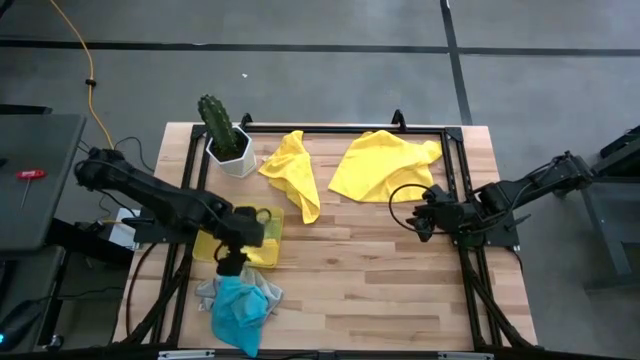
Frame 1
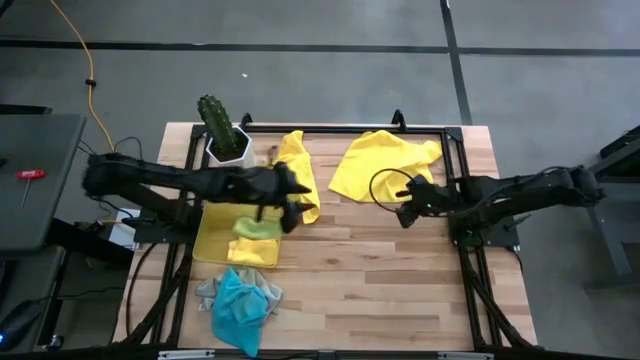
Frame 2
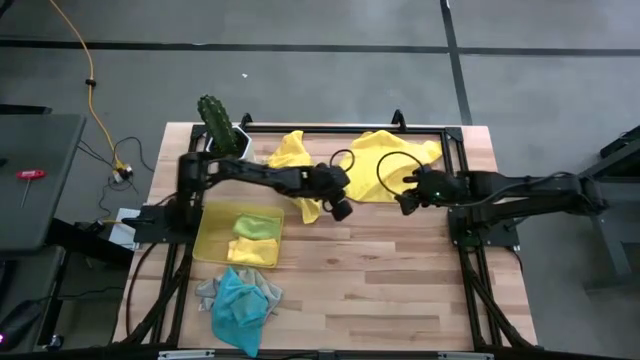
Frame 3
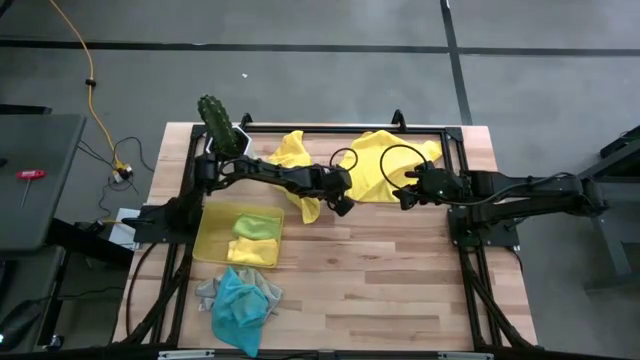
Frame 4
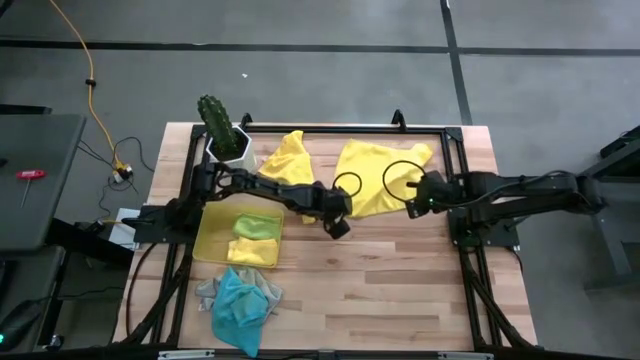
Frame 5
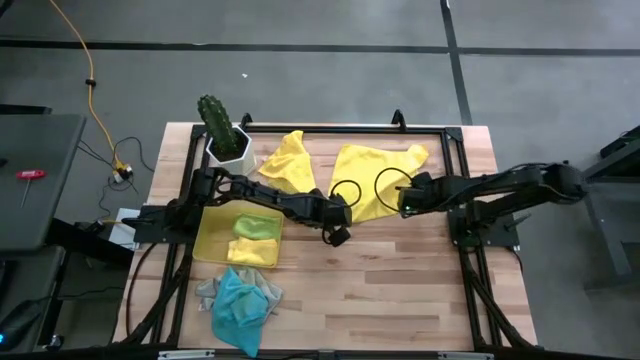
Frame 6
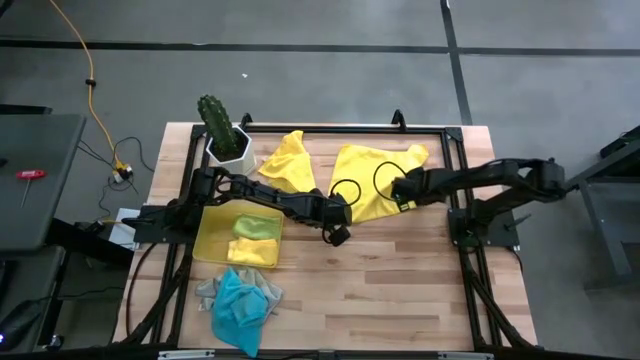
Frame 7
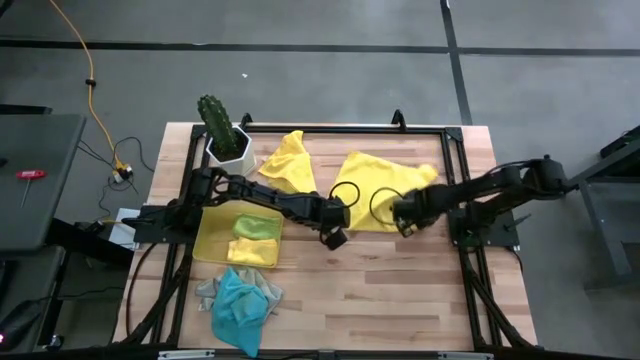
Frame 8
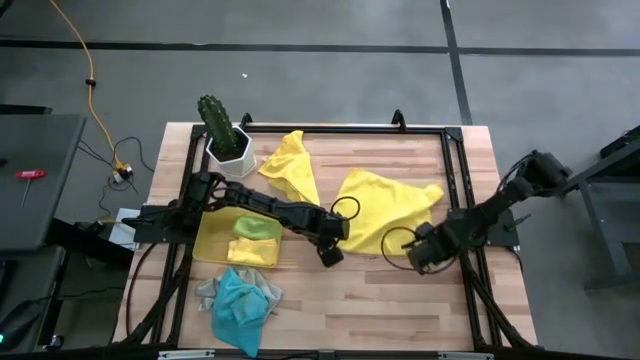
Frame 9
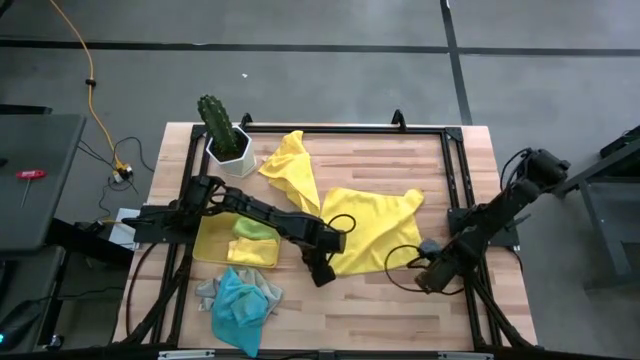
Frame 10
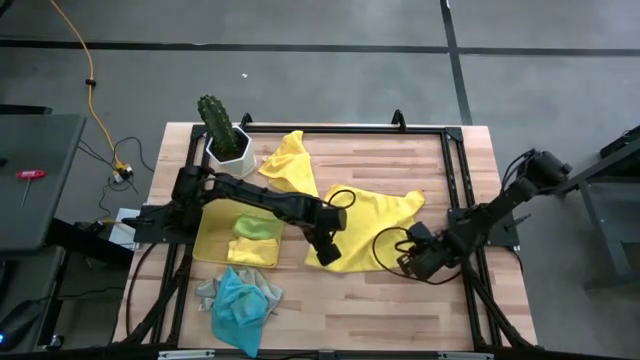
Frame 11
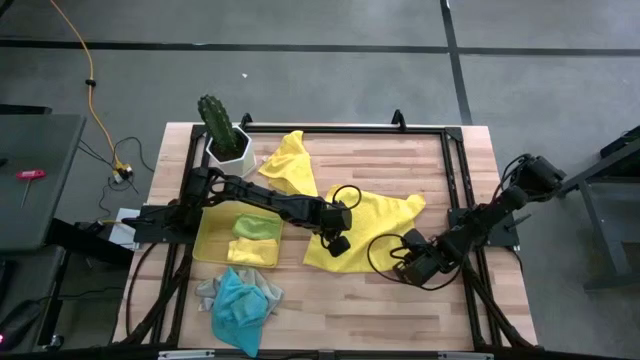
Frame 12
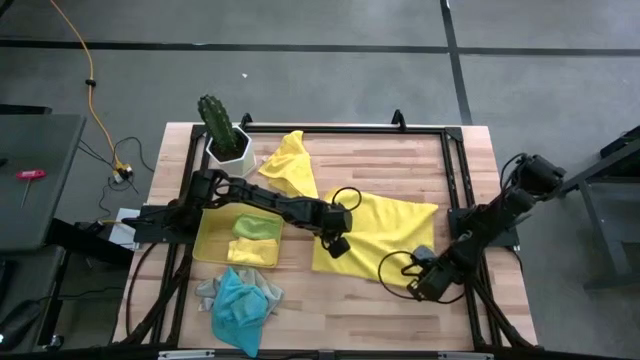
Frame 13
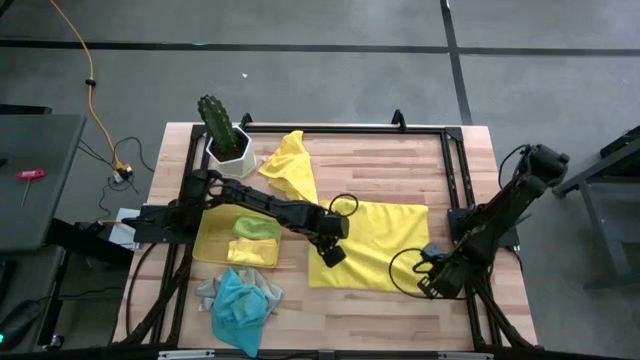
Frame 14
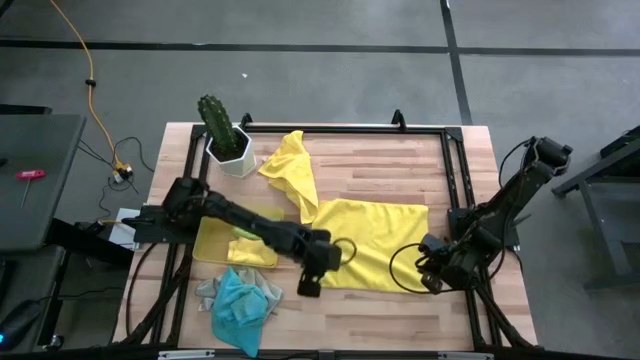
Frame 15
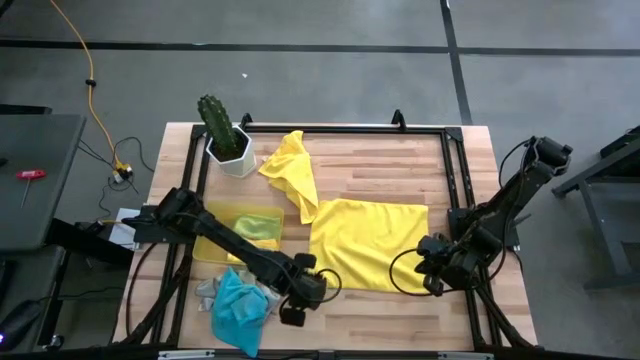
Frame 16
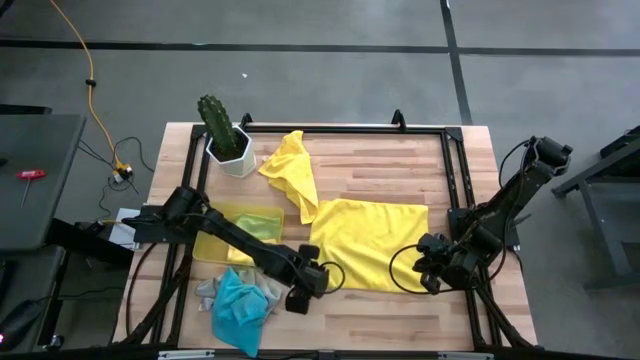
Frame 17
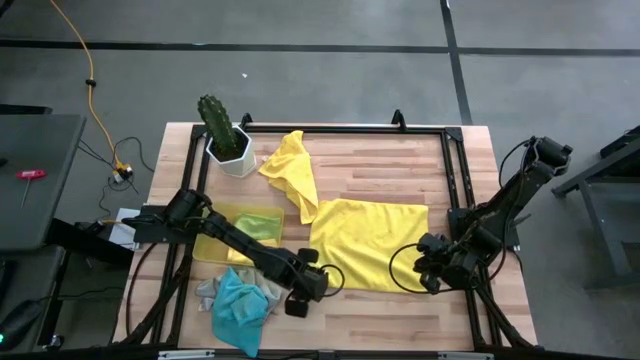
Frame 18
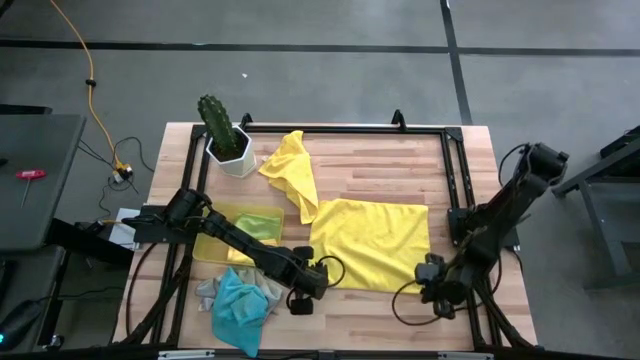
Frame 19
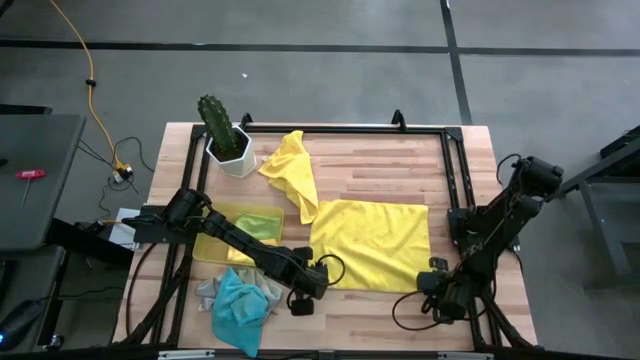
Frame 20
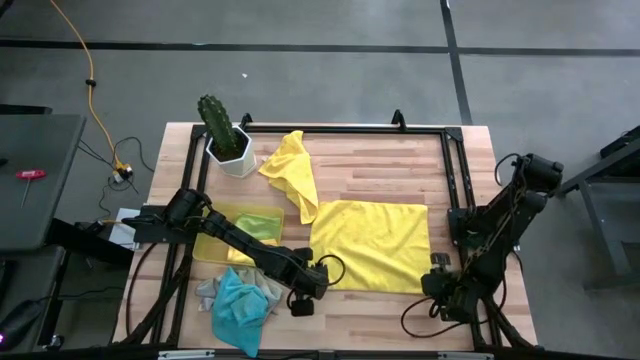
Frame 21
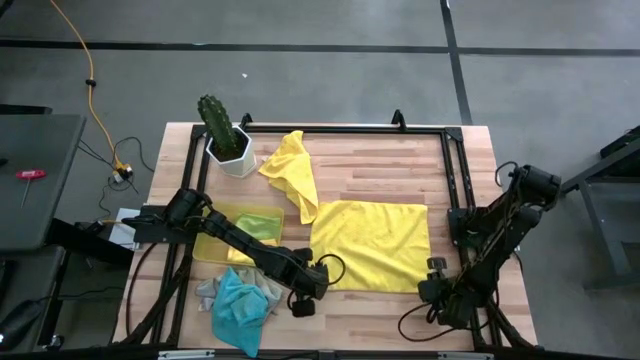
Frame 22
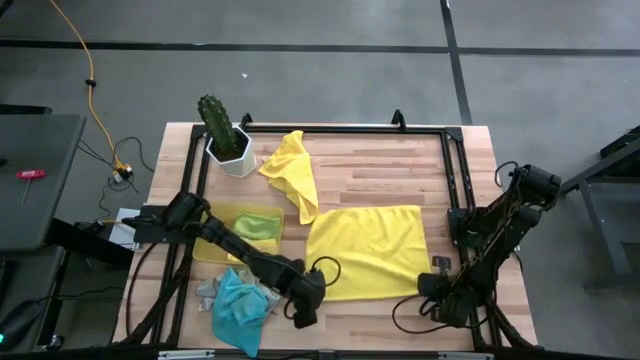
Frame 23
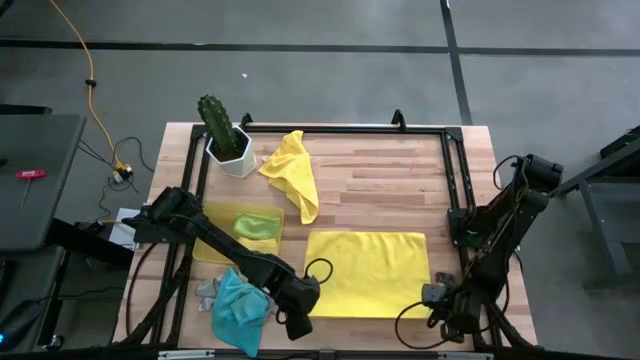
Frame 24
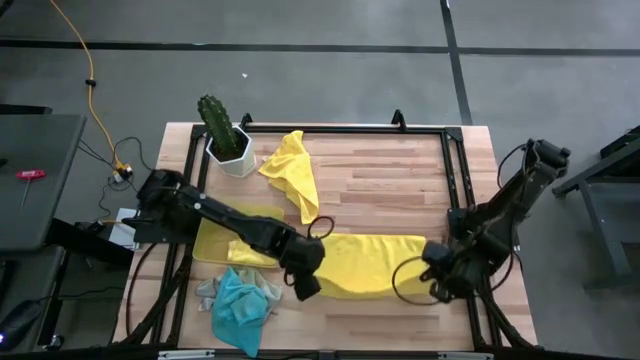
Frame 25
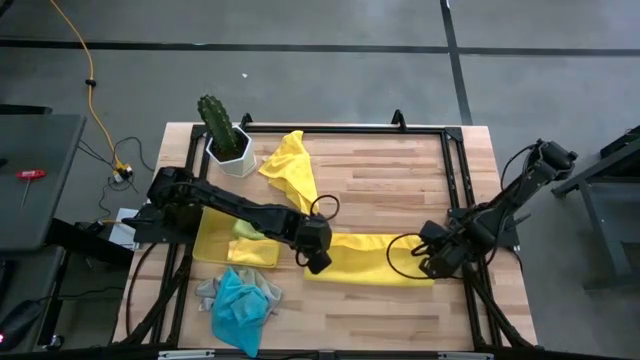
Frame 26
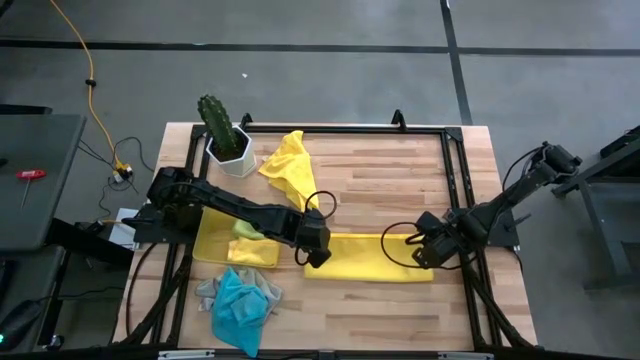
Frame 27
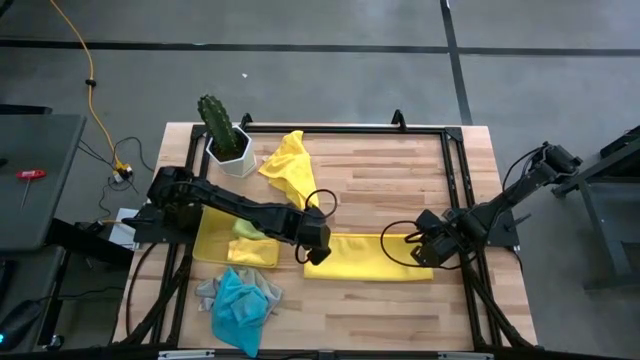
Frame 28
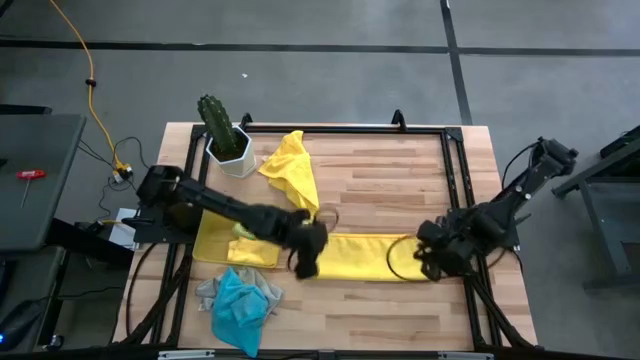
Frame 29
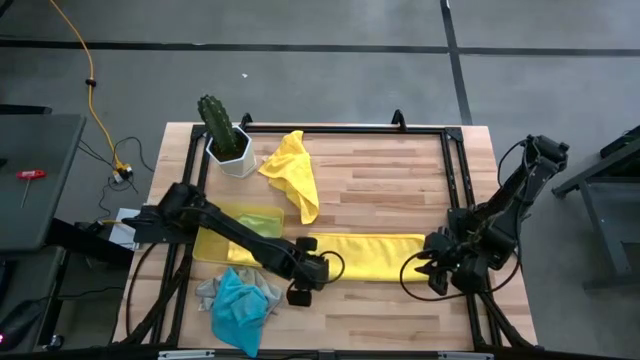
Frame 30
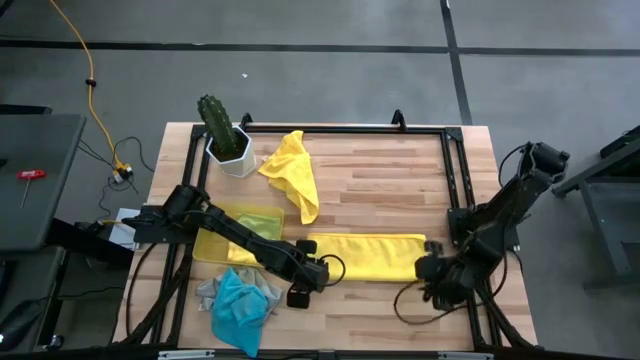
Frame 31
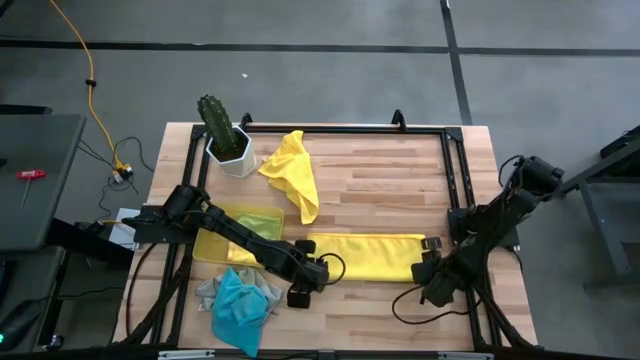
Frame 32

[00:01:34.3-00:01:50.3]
Task: Fold microfiber towels
Fold the right yellow microfiber towel

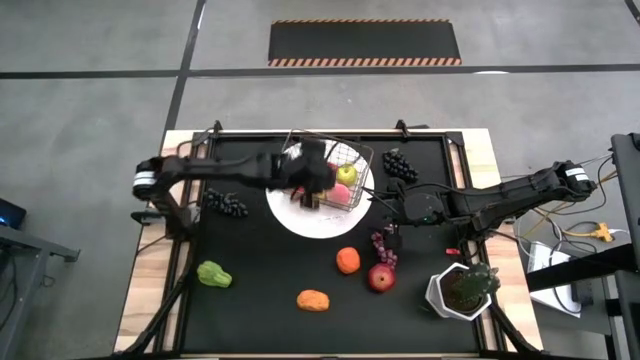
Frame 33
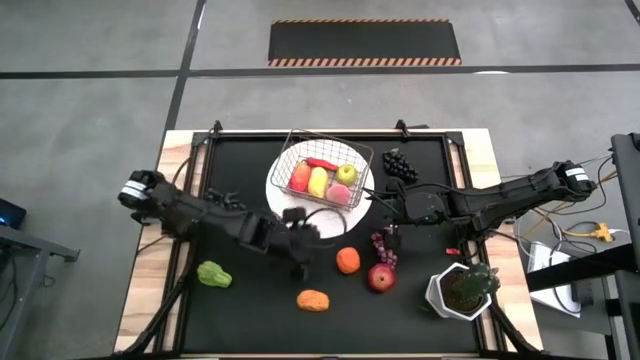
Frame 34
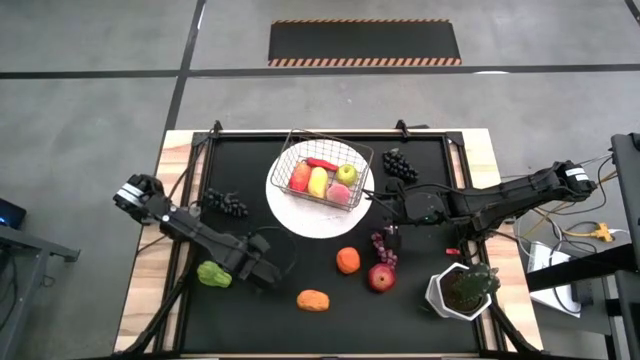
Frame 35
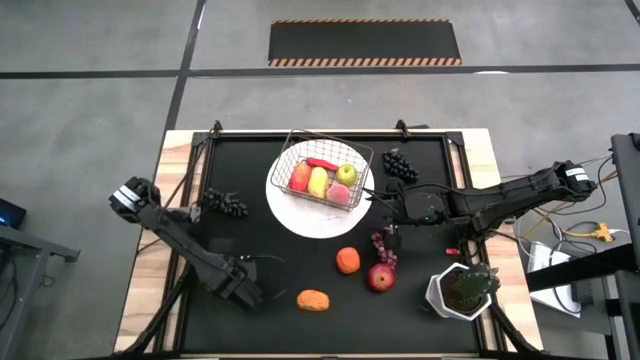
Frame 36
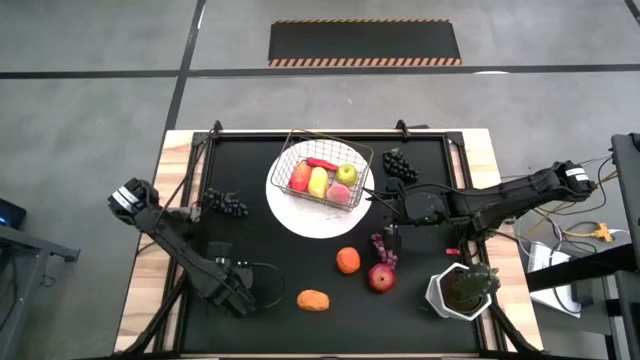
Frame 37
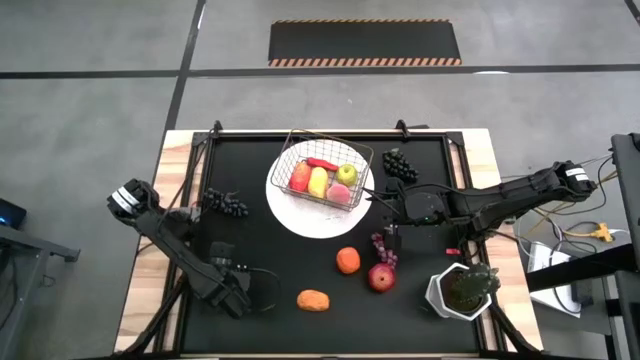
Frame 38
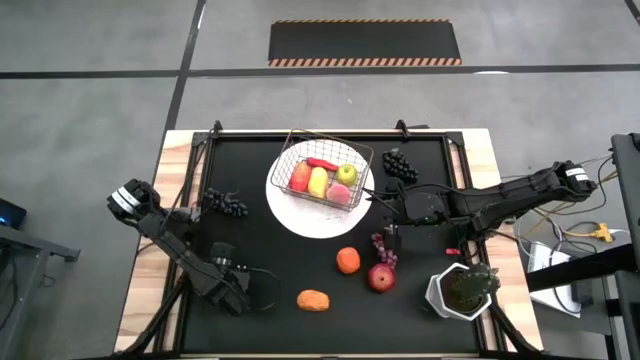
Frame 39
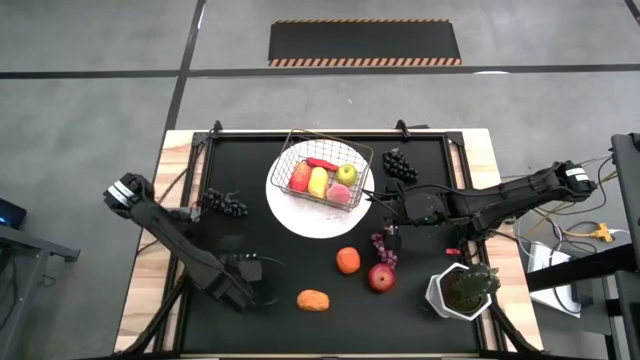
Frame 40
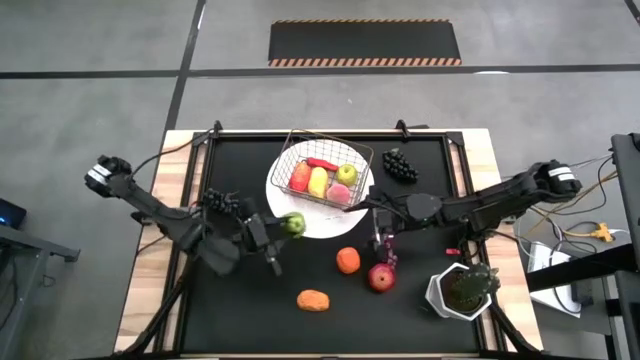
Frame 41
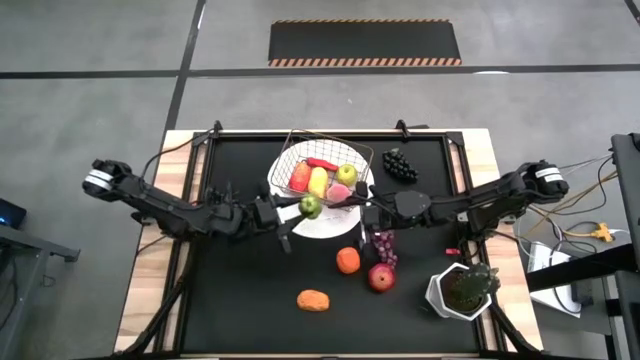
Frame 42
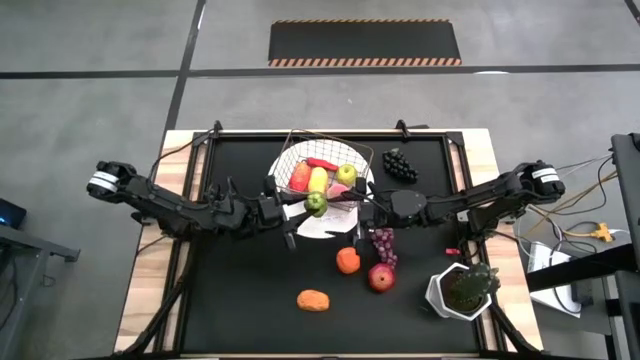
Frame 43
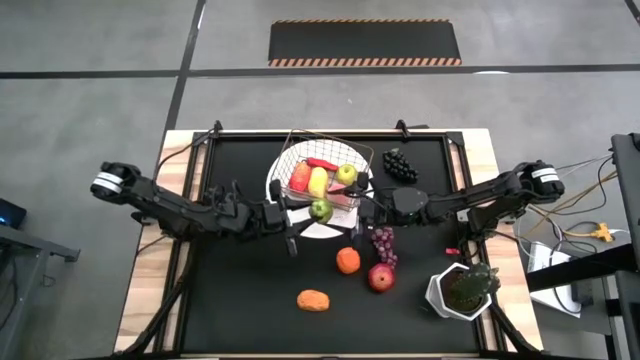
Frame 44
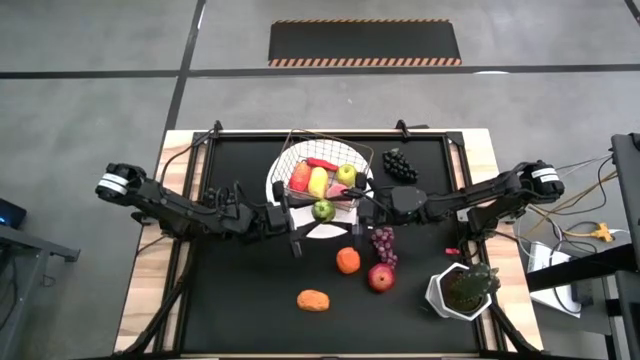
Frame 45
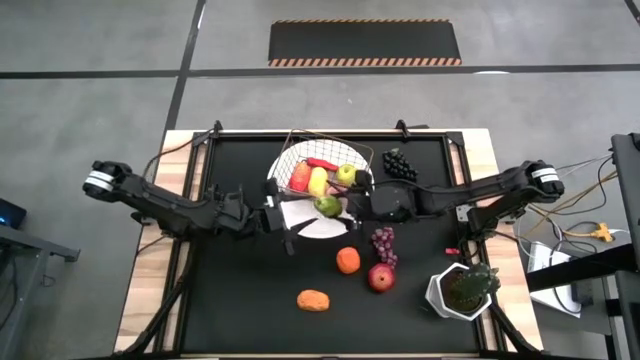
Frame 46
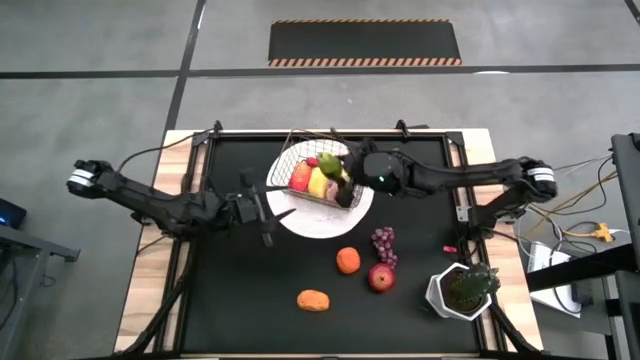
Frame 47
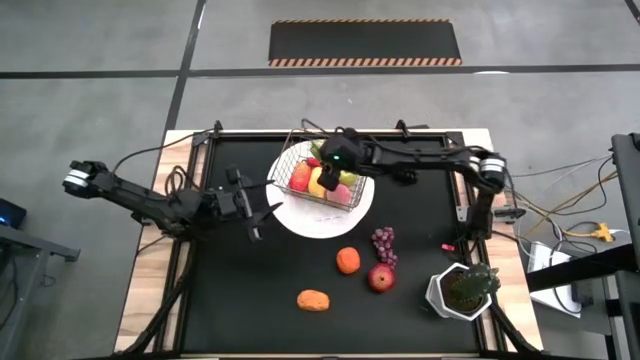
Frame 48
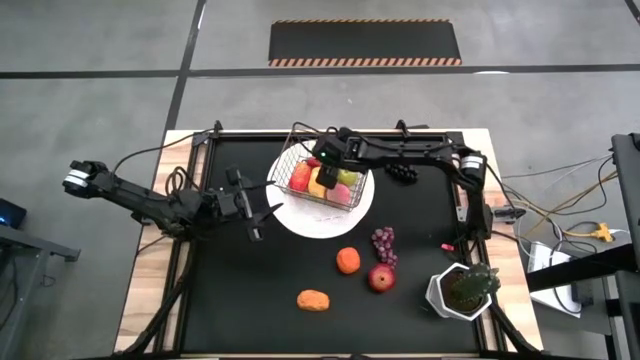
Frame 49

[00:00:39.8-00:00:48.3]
Task: Build produce basket
Put the green chayote into the silver basket
